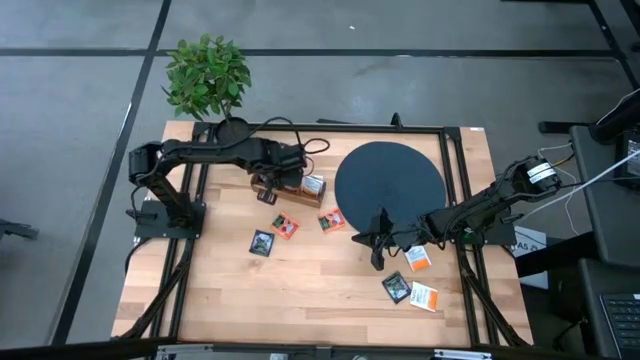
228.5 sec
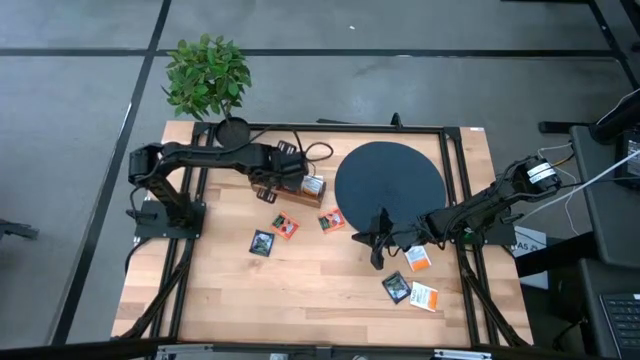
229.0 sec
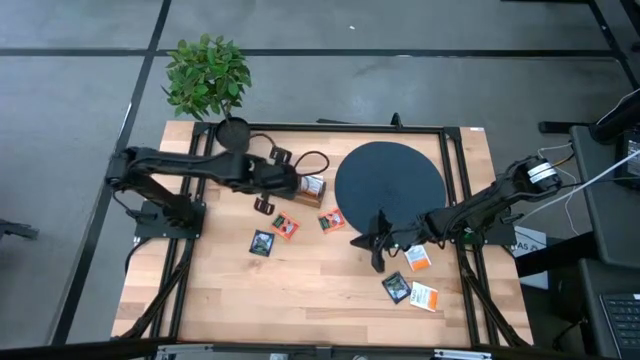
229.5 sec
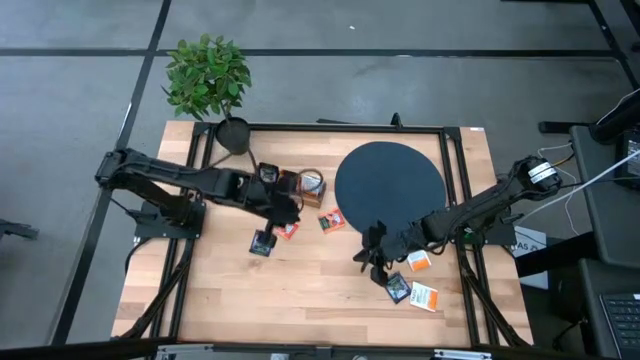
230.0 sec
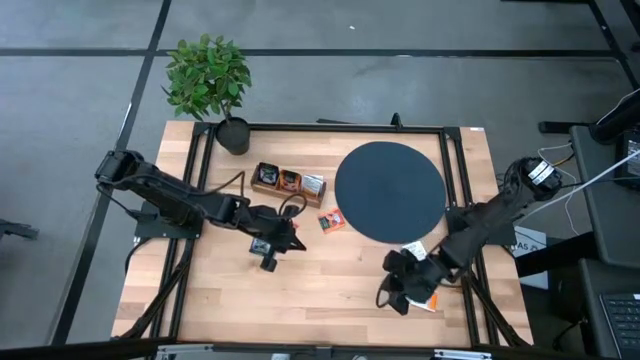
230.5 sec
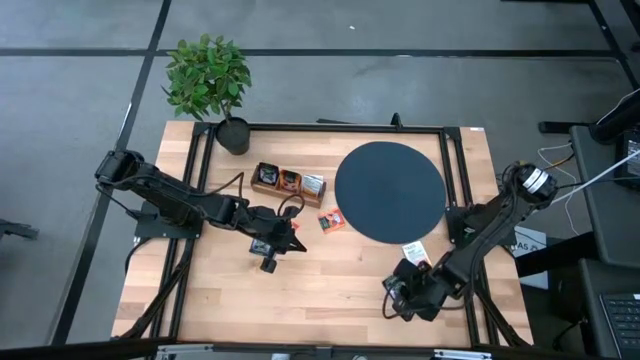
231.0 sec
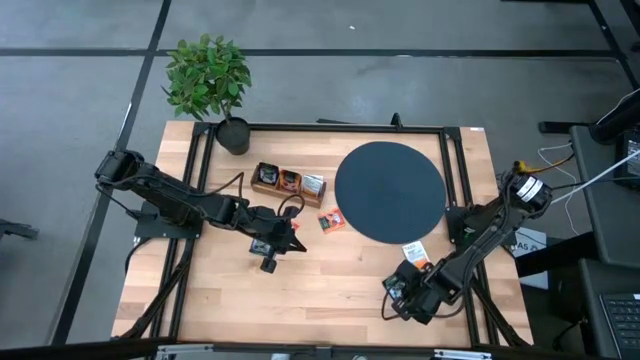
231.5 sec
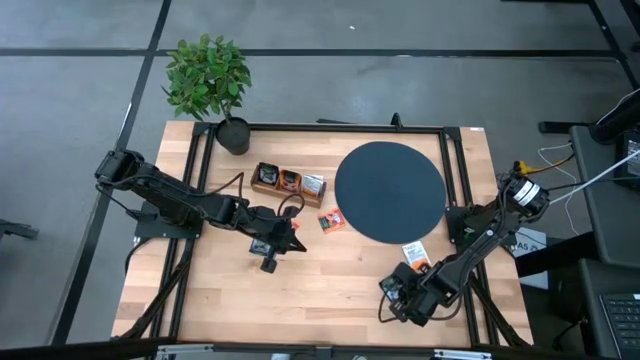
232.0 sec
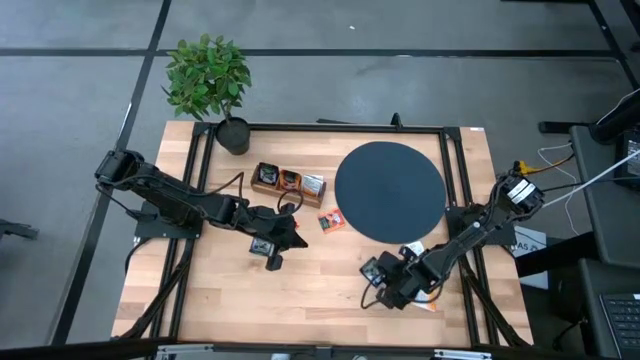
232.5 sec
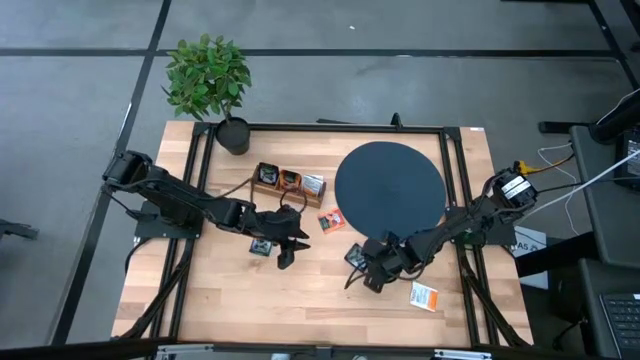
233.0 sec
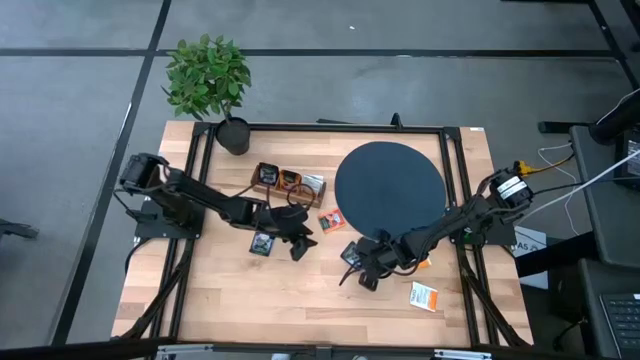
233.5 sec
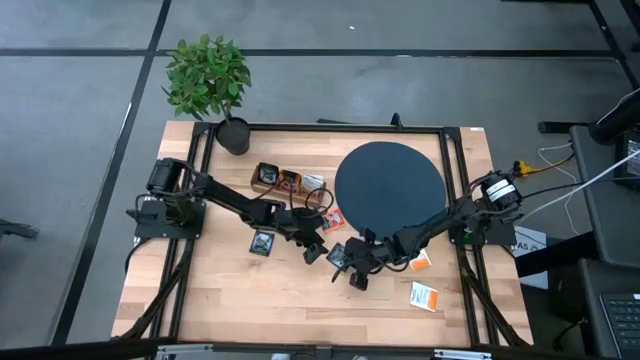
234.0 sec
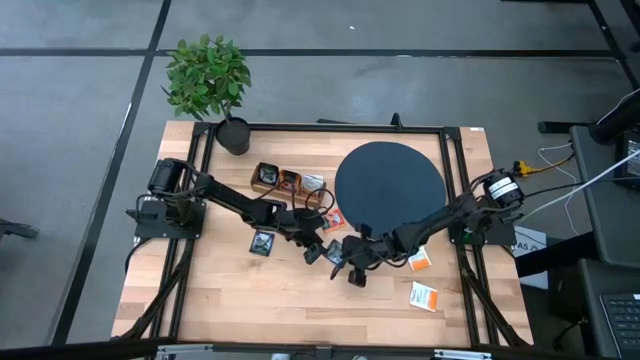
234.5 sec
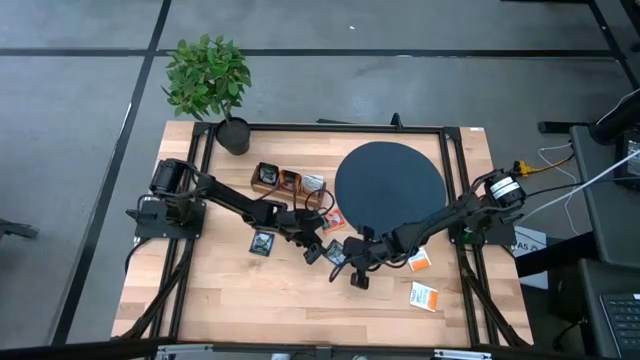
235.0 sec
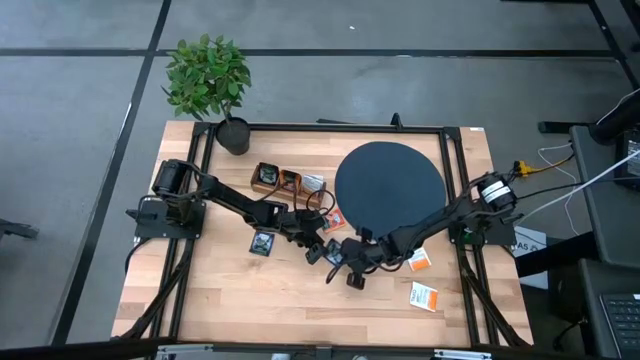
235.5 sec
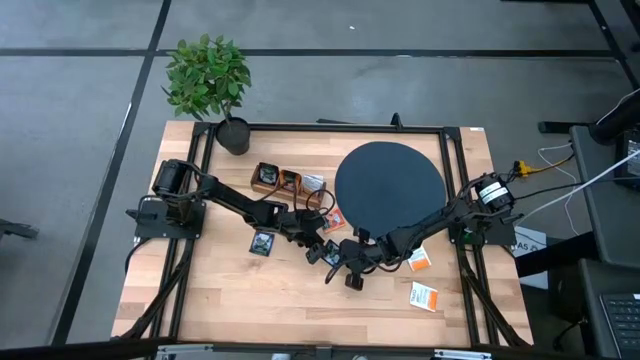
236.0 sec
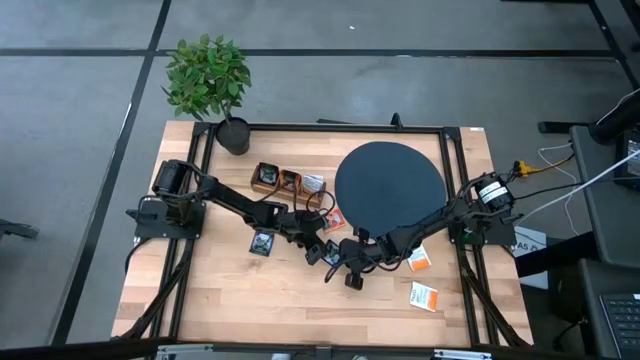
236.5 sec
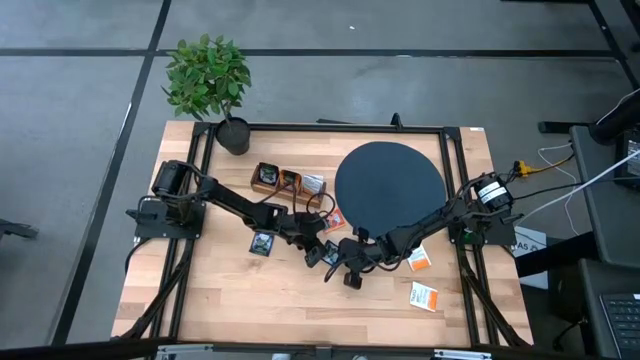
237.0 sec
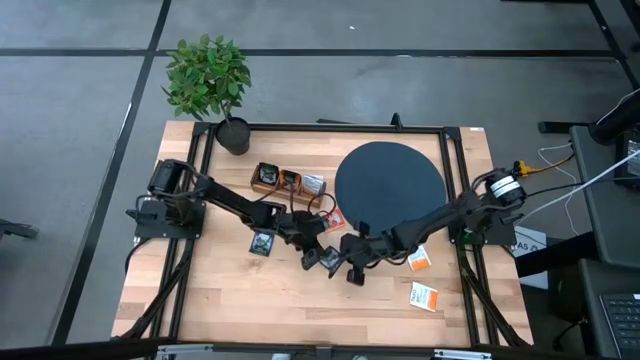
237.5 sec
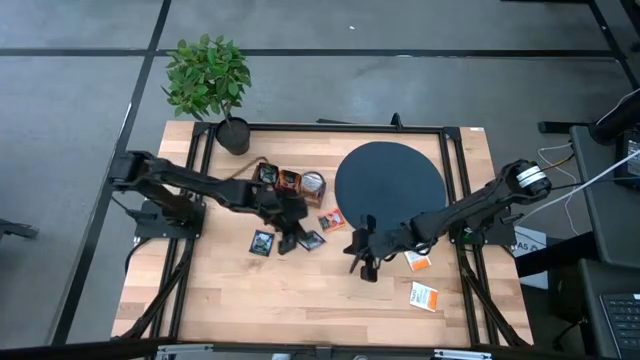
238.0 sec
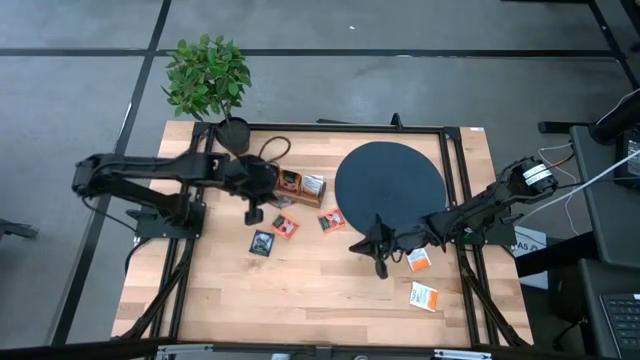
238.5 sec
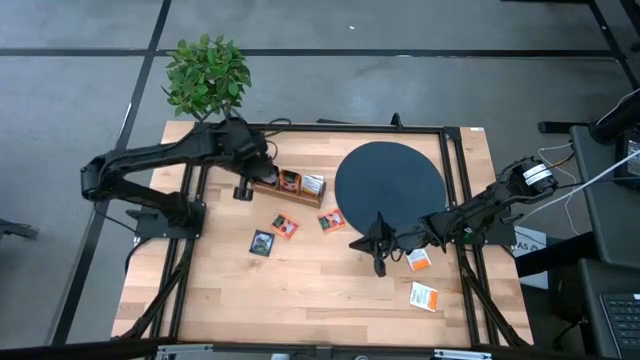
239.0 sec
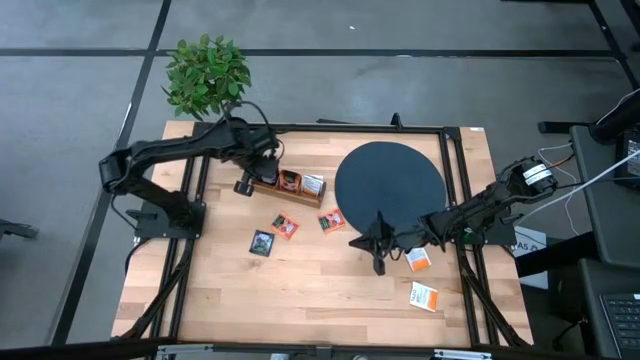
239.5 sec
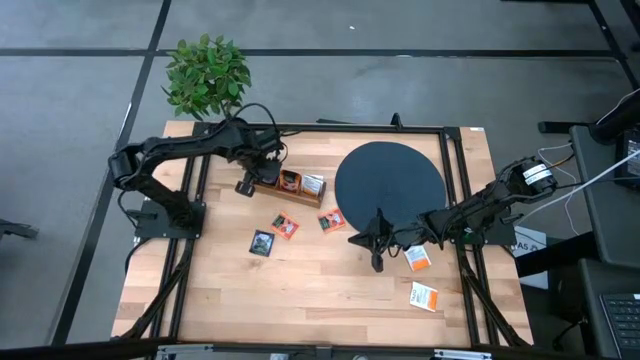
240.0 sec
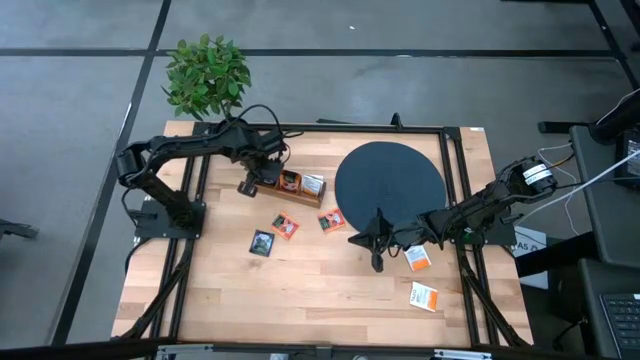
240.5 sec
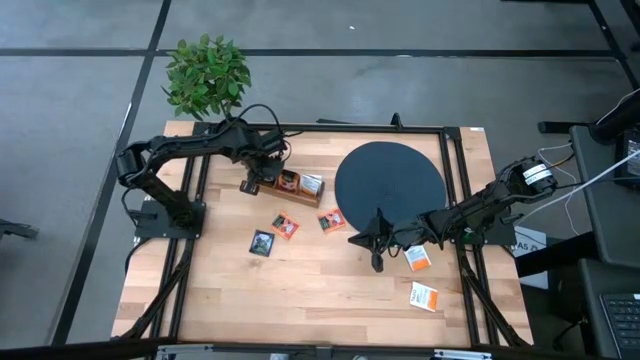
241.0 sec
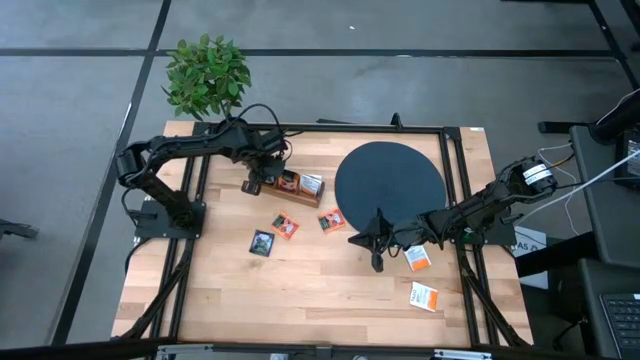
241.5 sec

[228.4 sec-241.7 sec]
Task: Pick & Place Tea
Put the right dark blue tea bag into the left section of the wooden organizer

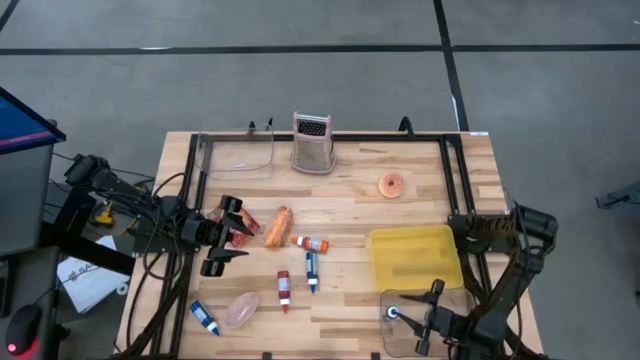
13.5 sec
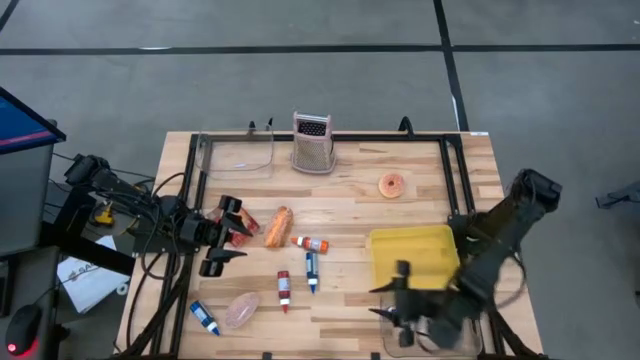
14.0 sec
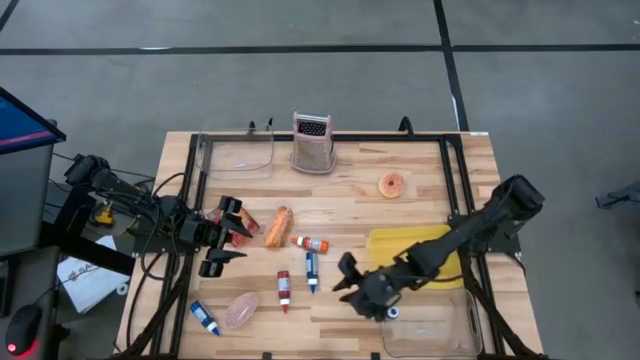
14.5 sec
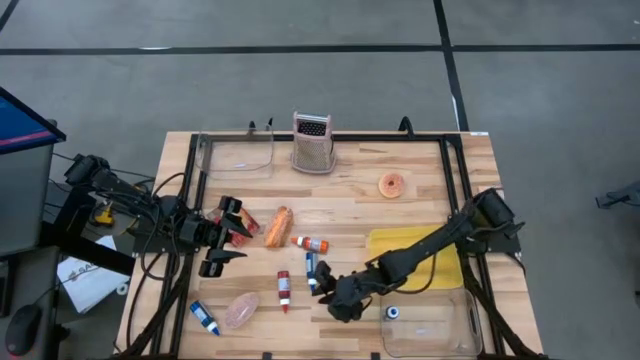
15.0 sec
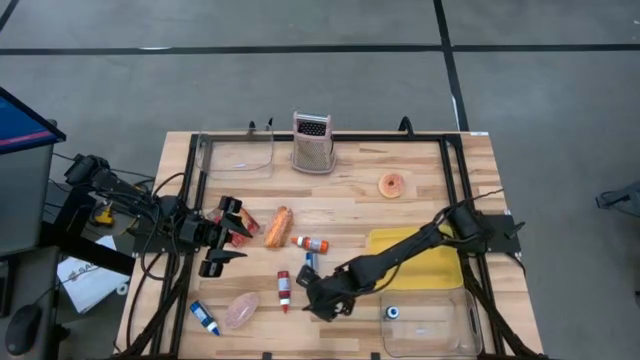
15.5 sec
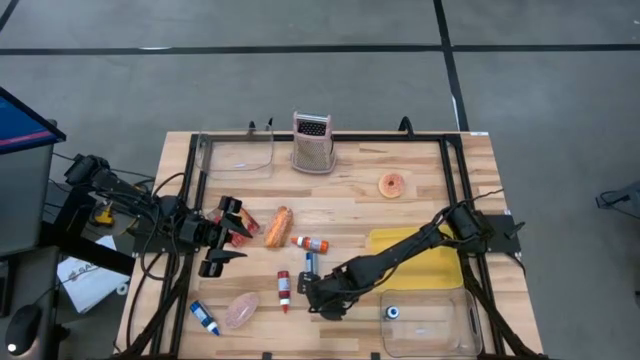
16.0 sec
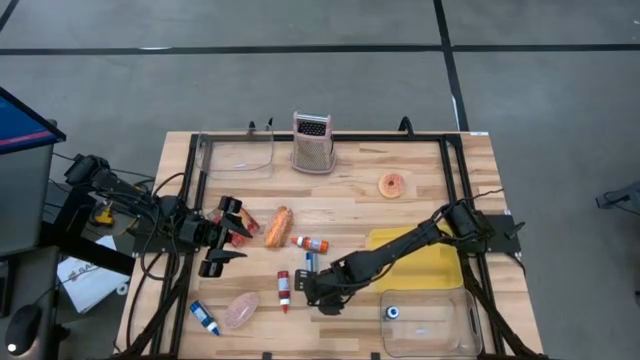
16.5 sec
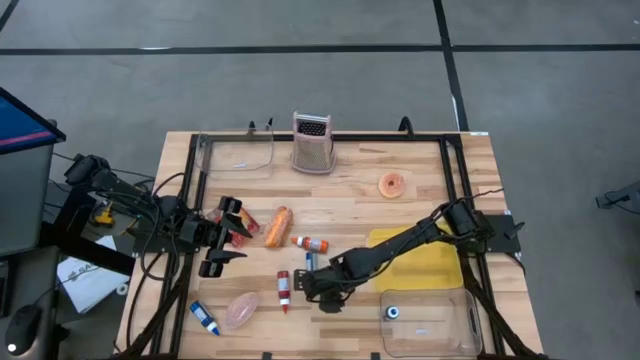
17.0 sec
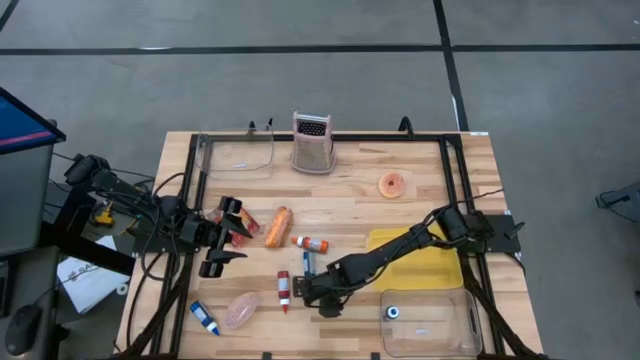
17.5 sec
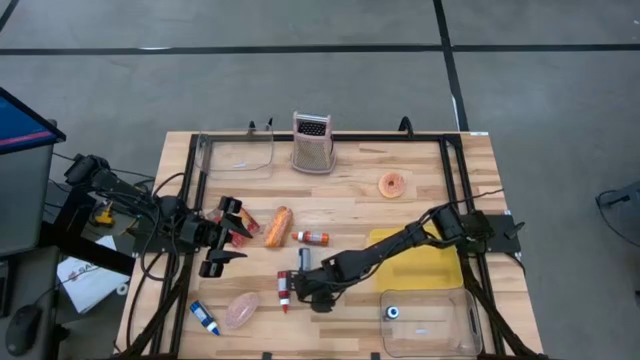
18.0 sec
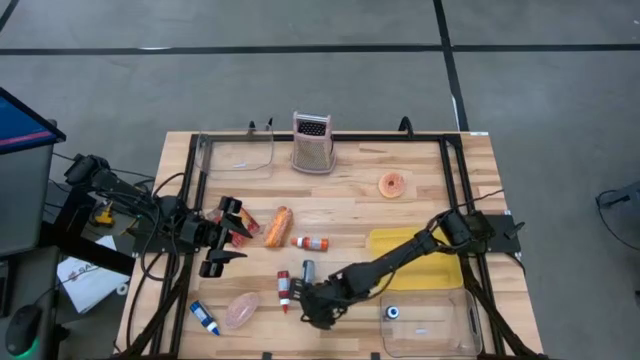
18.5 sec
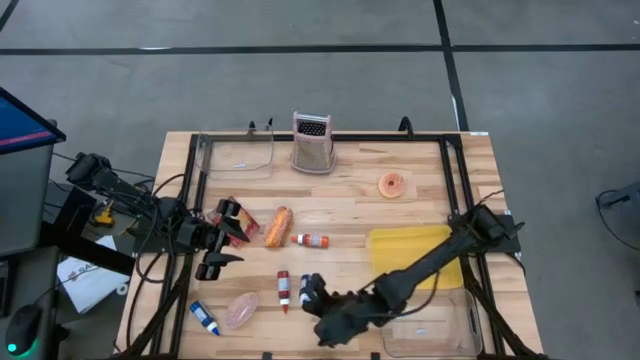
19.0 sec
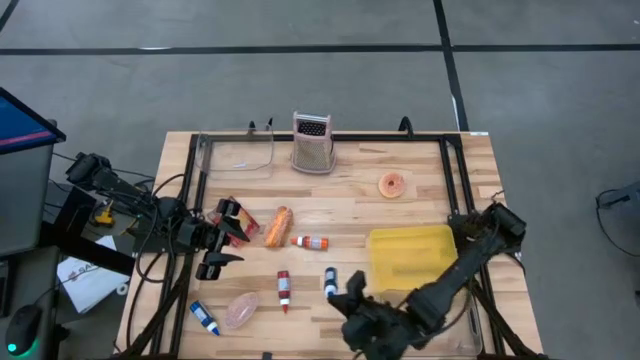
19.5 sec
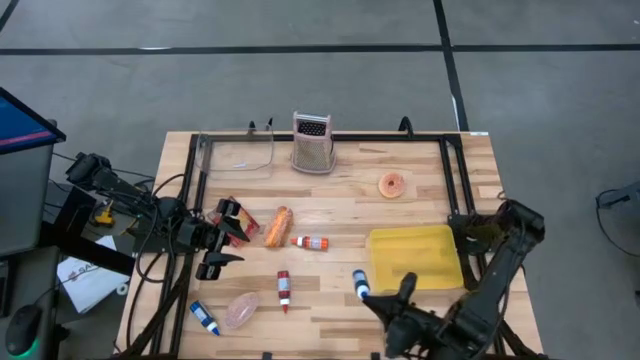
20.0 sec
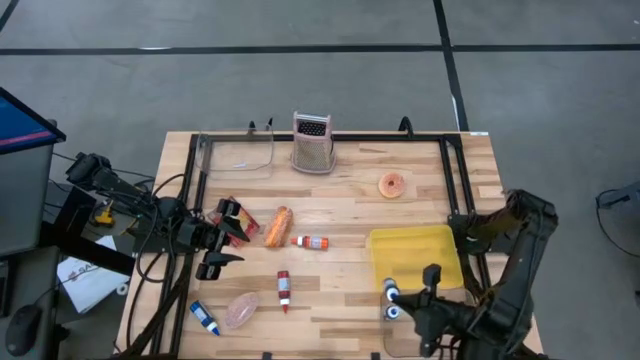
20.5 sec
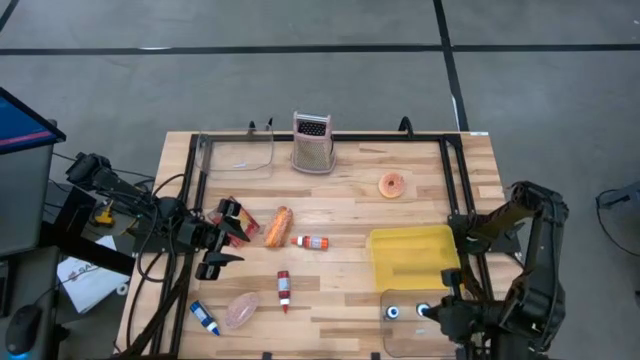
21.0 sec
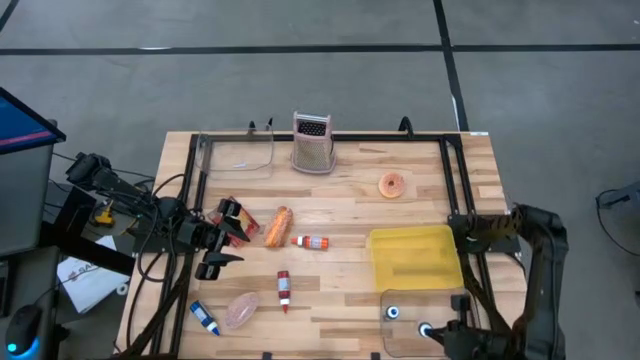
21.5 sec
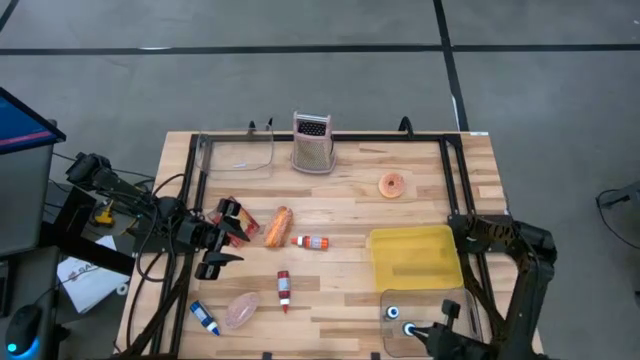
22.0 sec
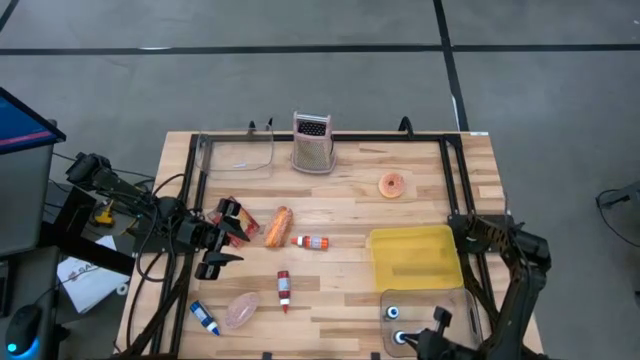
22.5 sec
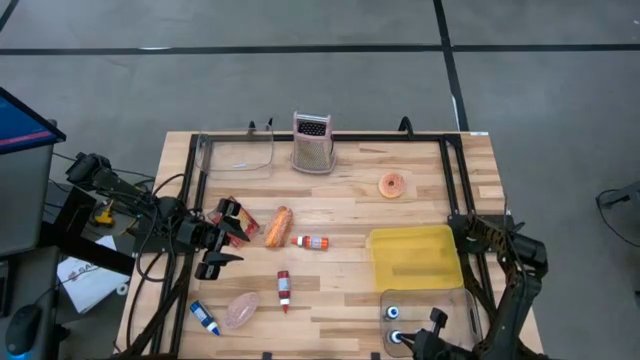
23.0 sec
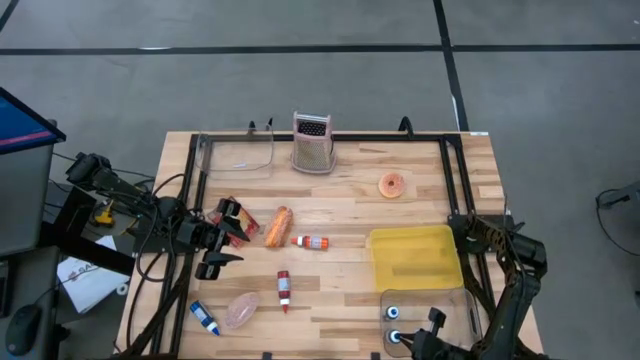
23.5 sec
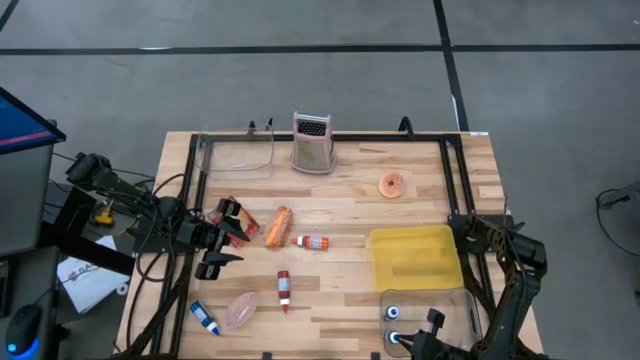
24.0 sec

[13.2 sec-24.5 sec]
Task: Pick & Place Food Item
Put the right blue food coloring bottle into the bottom transparent bin
